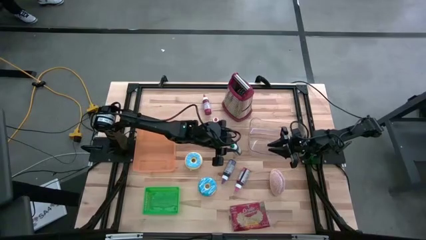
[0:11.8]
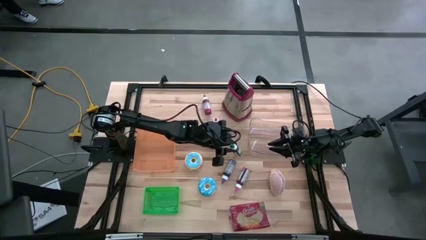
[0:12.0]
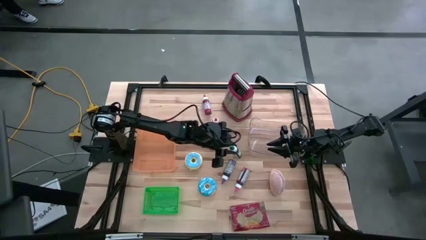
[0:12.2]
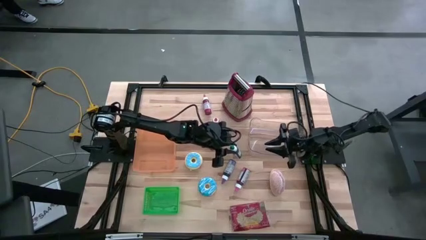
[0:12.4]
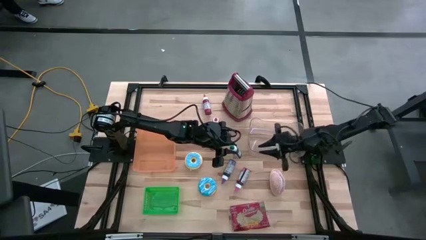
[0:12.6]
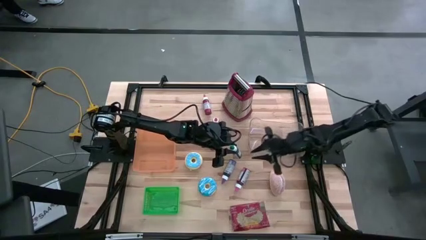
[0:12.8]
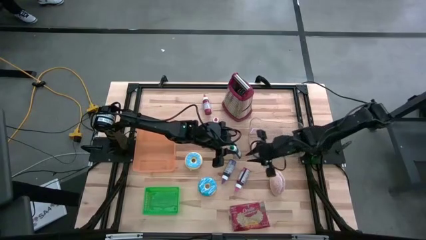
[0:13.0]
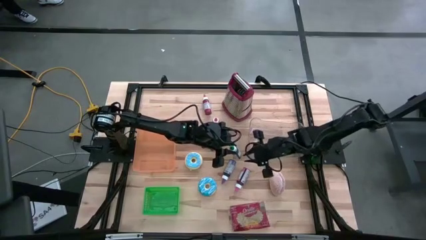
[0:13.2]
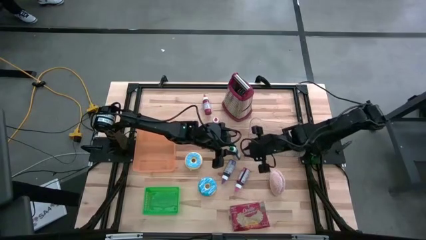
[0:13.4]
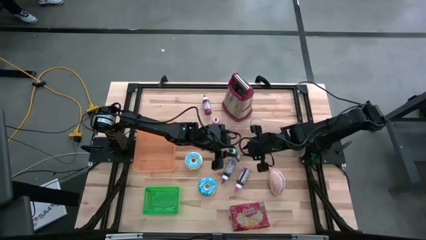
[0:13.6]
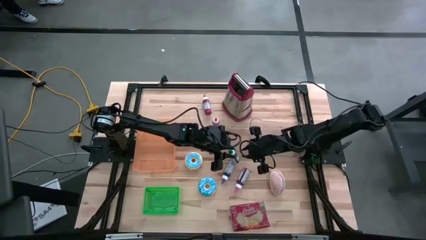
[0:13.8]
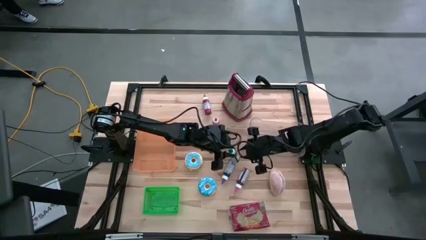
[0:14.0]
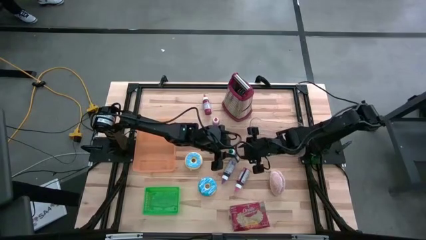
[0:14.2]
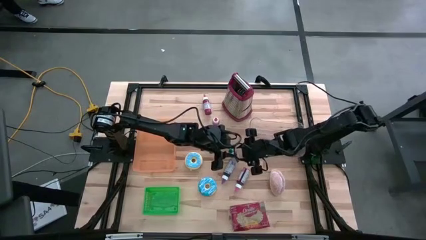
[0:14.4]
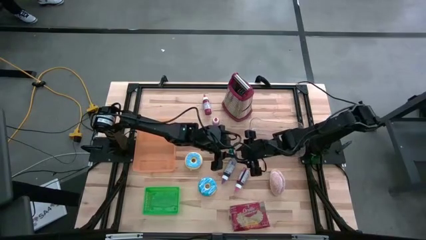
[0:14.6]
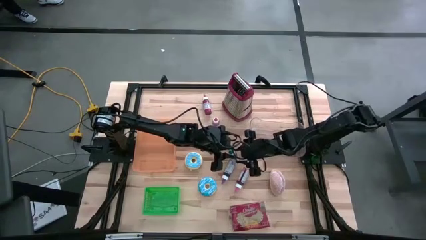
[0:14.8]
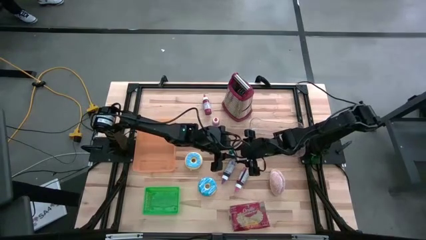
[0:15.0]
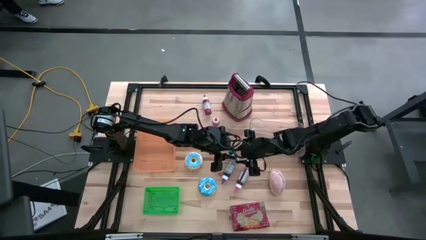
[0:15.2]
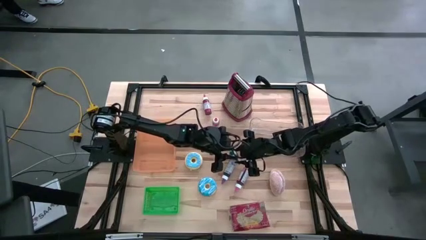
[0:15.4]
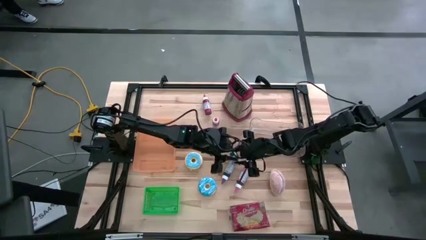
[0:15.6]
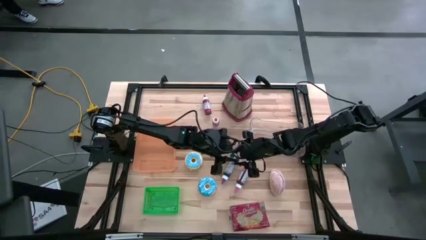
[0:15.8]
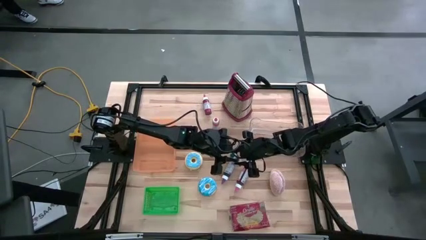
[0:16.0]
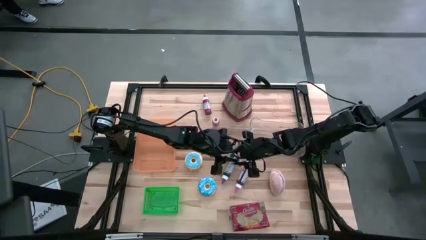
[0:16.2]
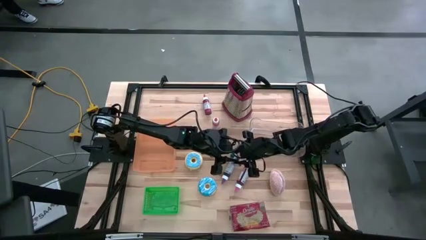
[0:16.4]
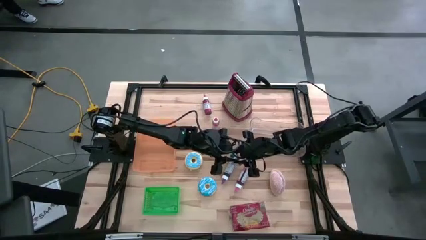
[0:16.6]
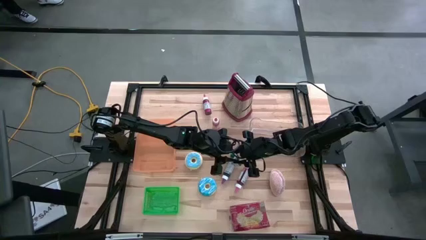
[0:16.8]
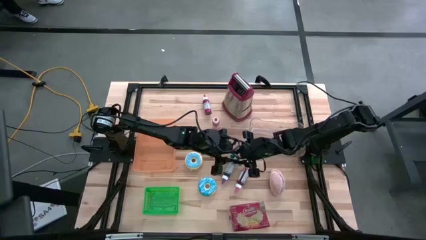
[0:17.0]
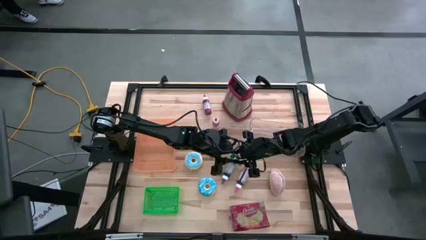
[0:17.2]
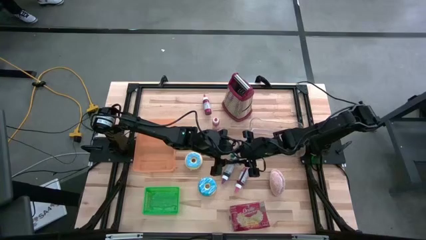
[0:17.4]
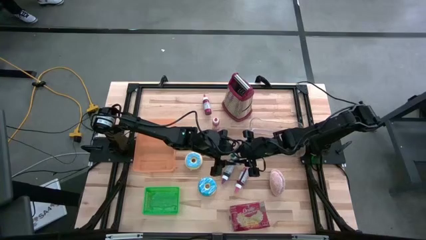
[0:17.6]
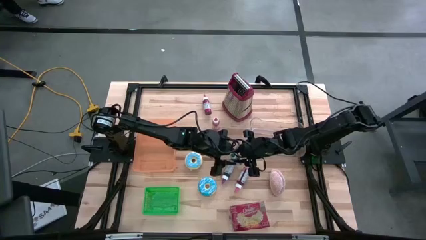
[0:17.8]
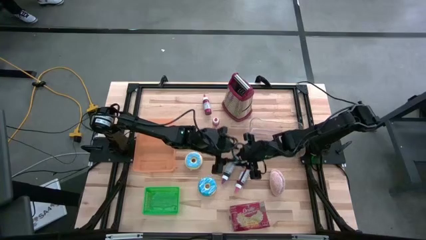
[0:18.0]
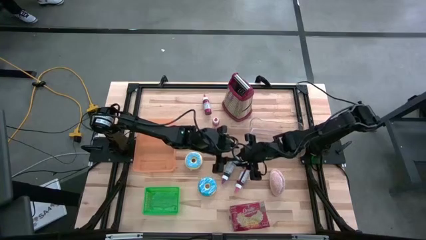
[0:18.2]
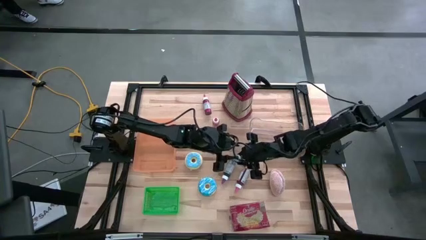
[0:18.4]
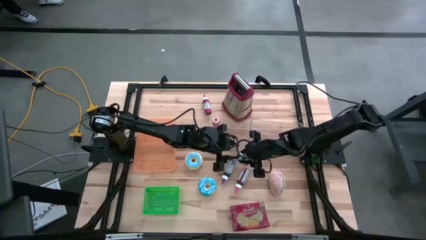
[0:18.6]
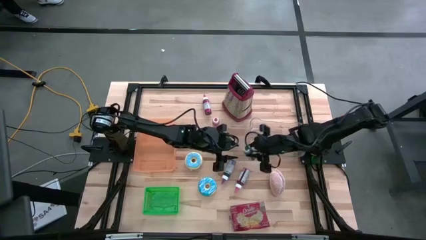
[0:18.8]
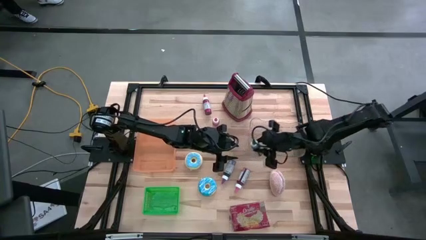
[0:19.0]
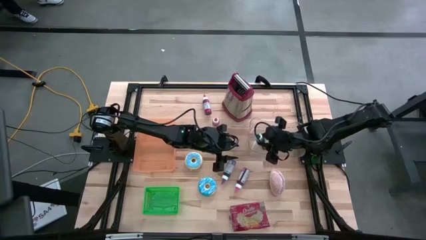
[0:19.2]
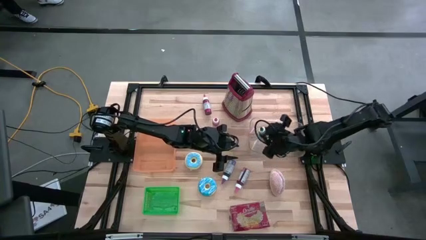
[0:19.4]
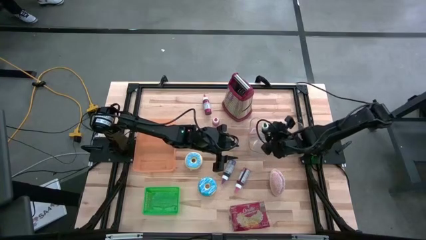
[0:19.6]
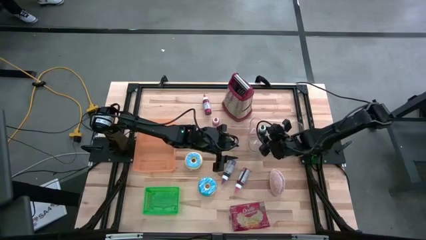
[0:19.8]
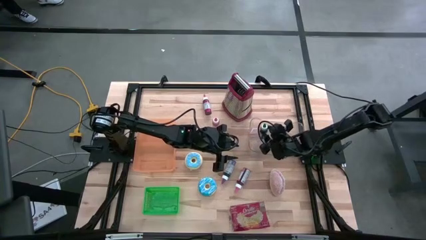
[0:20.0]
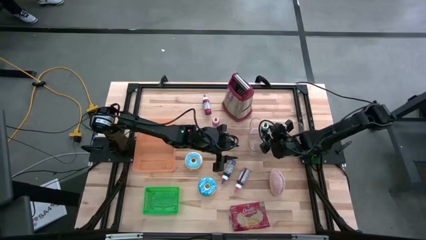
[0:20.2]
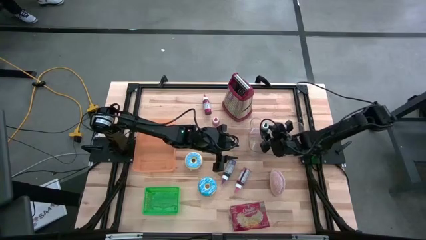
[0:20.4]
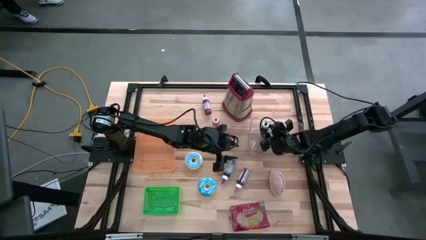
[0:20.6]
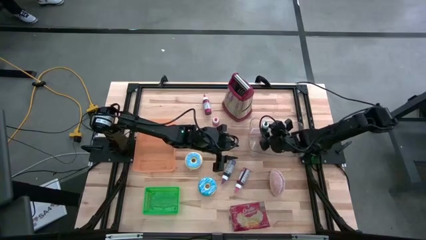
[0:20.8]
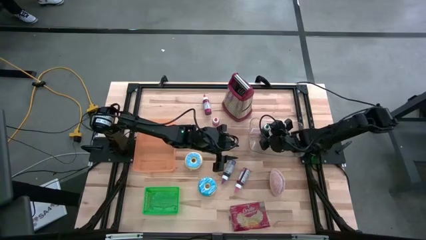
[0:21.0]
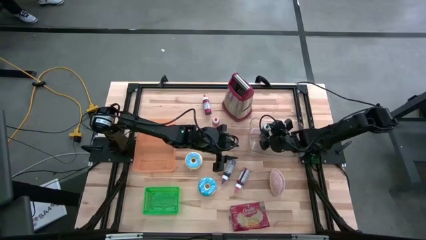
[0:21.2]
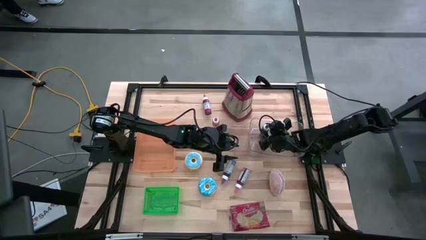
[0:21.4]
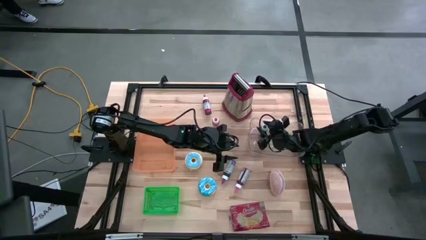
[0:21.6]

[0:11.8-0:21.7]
Put the green food coloring into the transparent bin

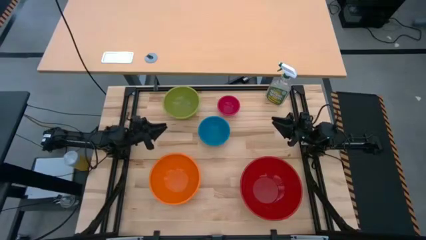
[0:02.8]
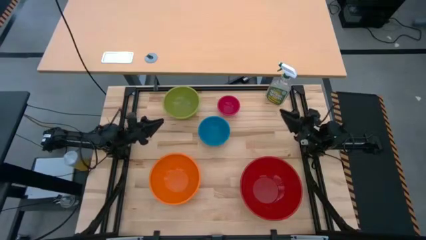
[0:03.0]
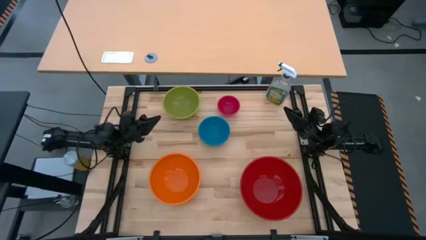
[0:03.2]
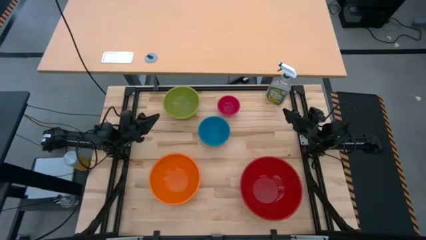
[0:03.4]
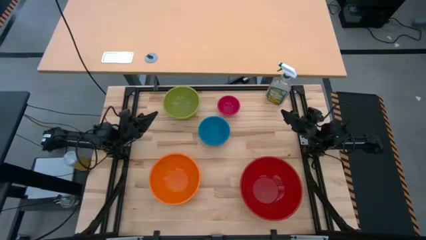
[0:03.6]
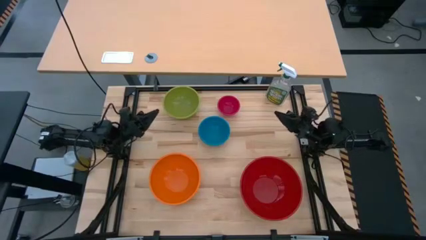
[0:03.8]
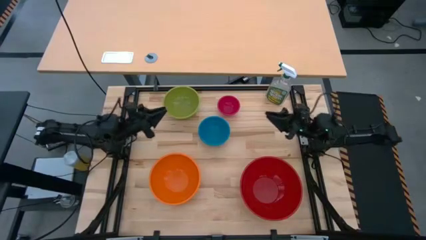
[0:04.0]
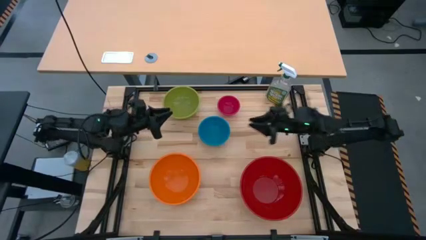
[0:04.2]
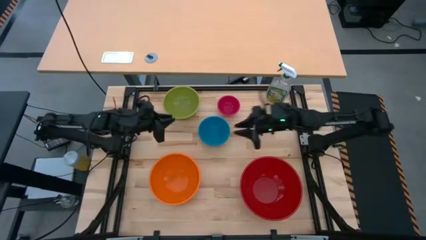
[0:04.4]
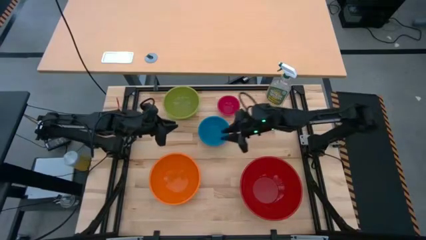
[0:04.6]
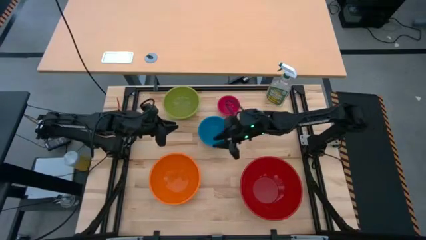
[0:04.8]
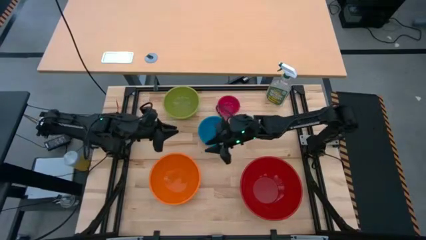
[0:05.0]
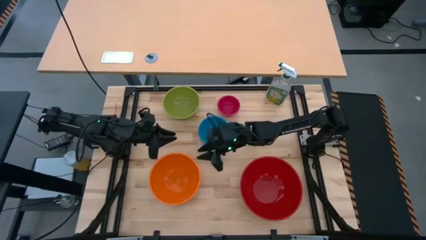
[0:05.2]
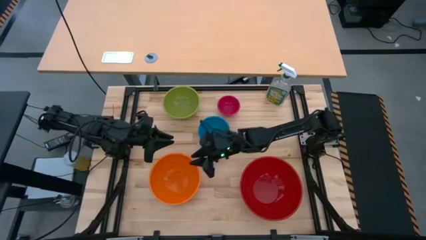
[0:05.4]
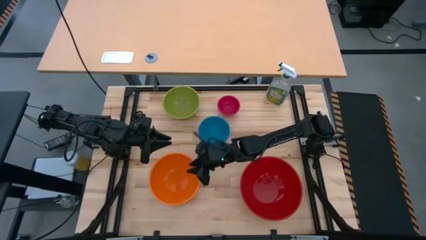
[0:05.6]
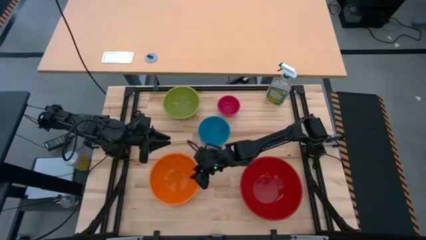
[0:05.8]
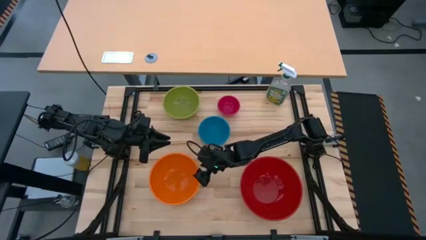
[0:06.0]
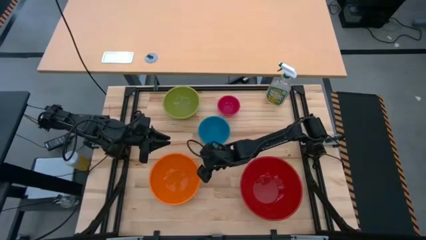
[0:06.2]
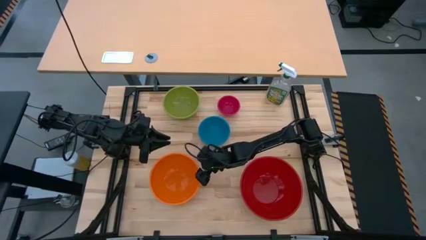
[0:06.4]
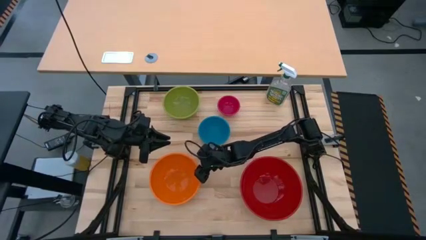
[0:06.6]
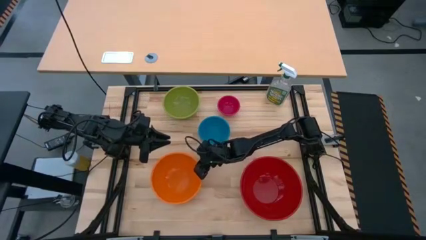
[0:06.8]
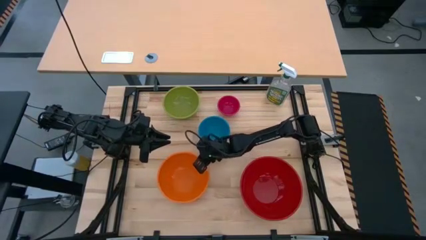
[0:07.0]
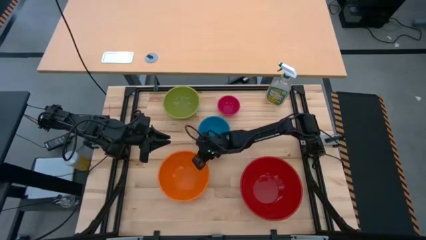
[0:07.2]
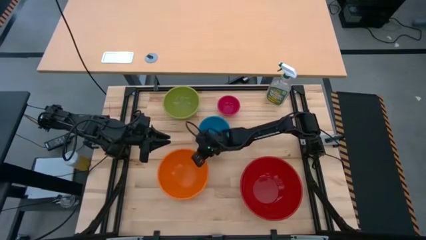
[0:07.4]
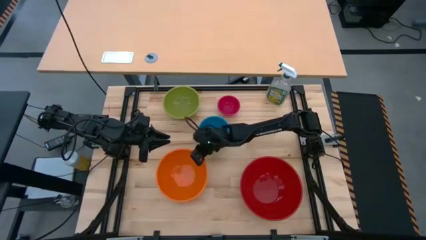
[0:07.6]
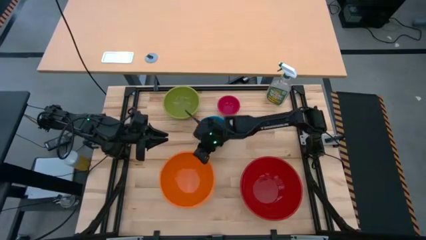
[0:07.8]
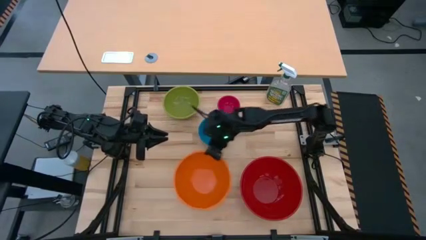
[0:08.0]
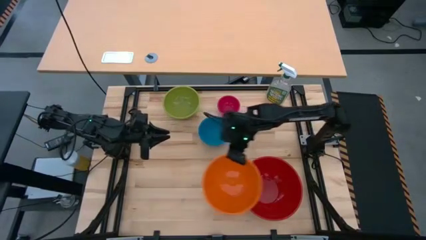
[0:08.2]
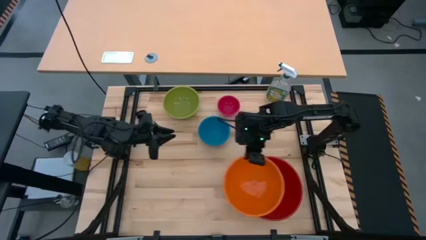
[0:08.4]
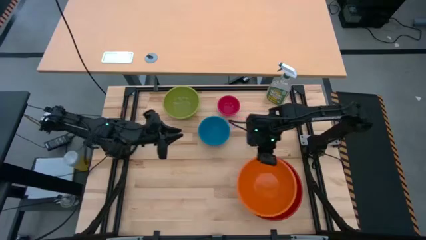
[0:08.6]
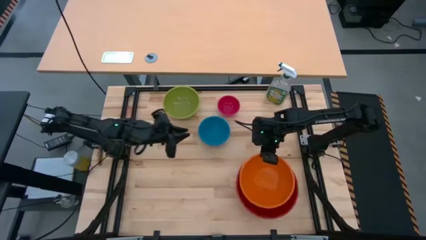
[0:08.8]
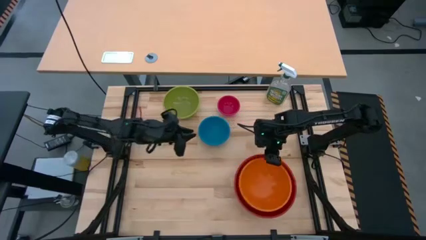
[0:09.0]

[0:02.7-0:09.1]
Stack the orange bowl on top of the red bowl
